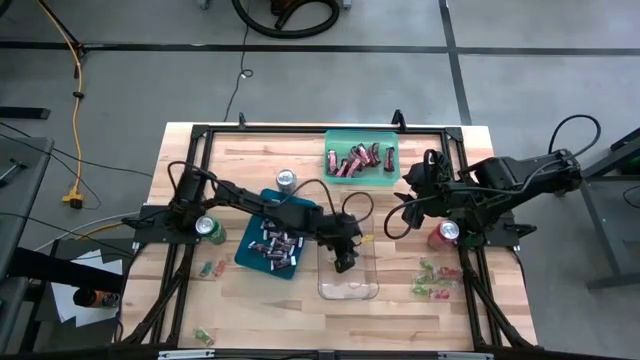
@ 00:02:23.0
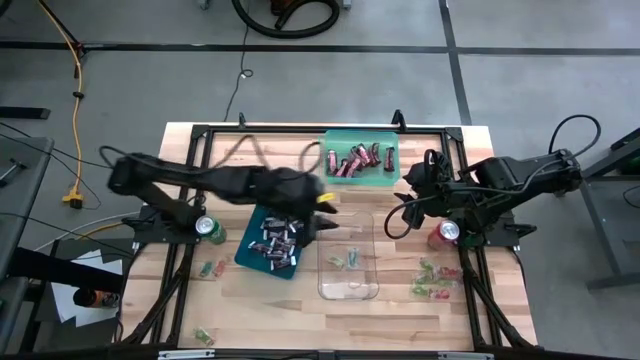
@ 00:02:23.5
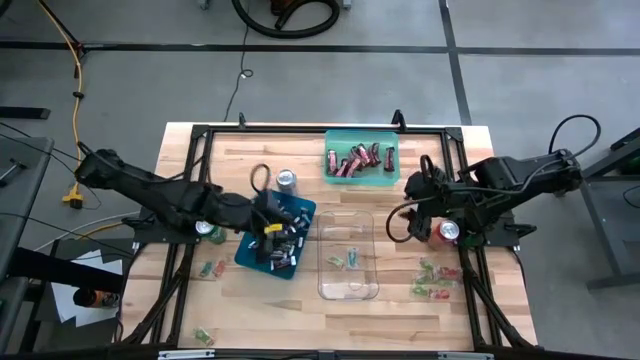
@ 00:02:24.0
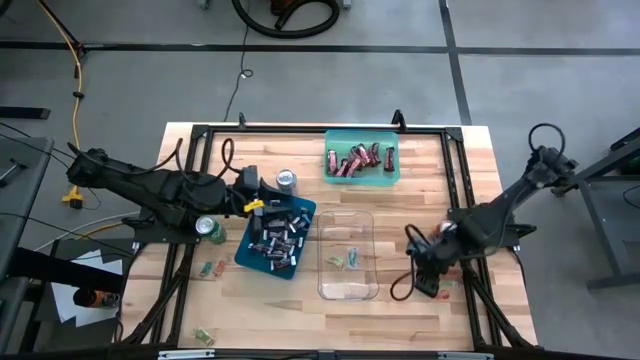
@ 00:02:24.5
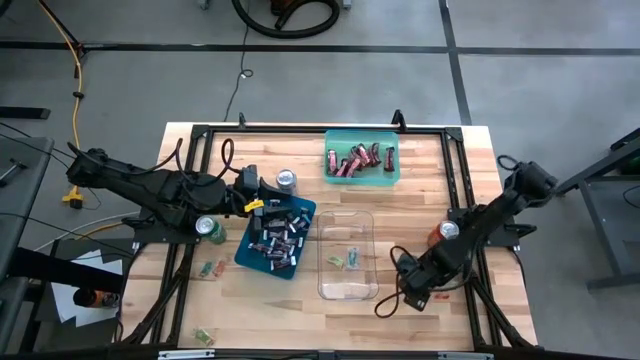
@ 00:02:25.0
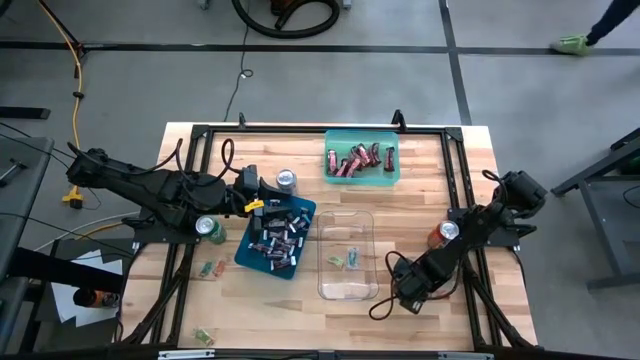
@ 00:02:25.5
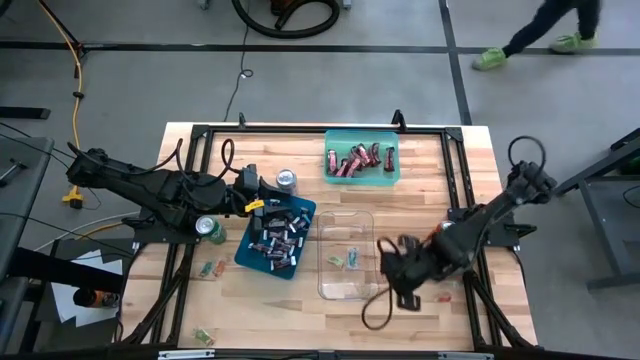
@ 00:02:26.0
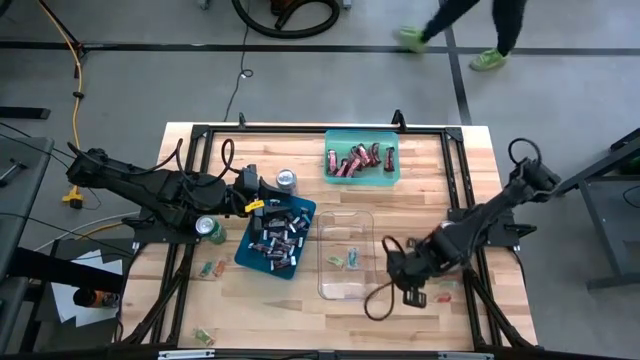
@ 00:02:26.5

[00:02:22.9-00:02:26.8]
Task: Sort candy
Put the green candy into the transparent bin

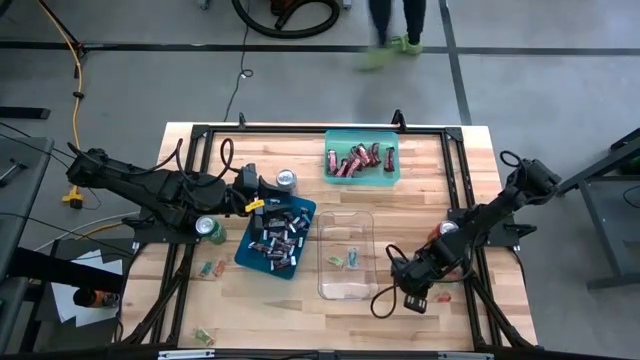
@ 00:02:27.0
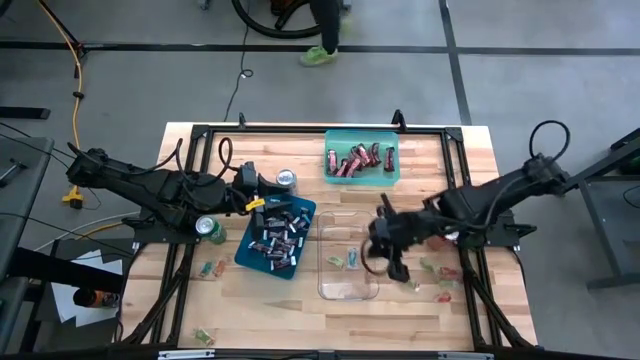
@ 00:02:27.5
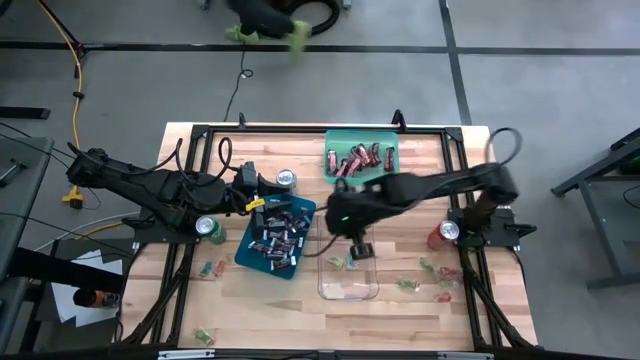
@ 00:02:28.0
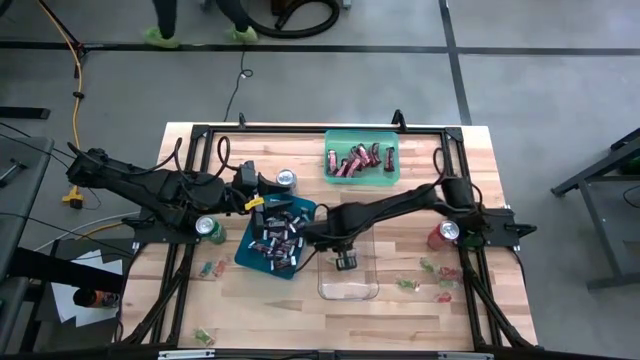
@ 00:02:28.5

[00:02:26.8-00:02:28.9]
Put the green candy into the transparent bin

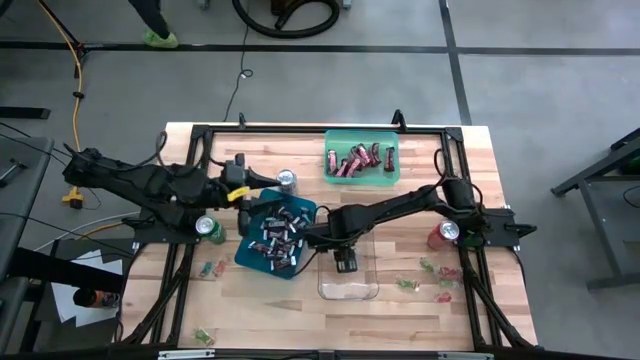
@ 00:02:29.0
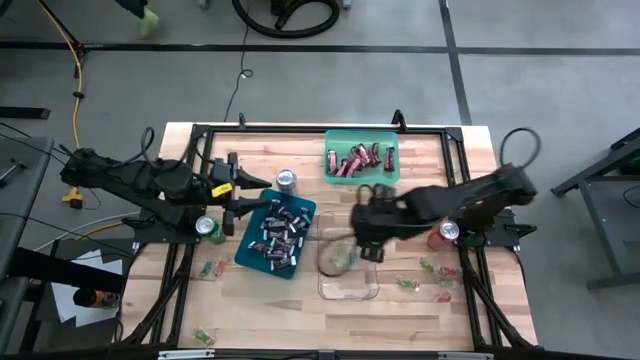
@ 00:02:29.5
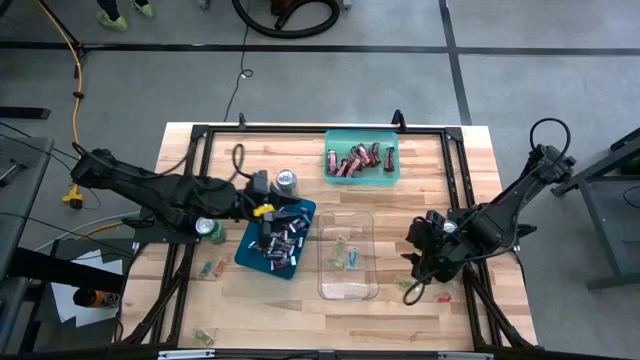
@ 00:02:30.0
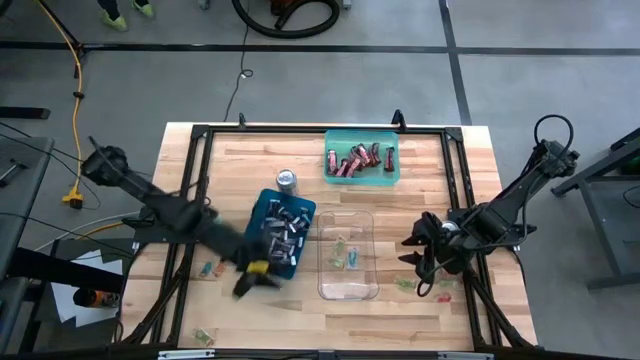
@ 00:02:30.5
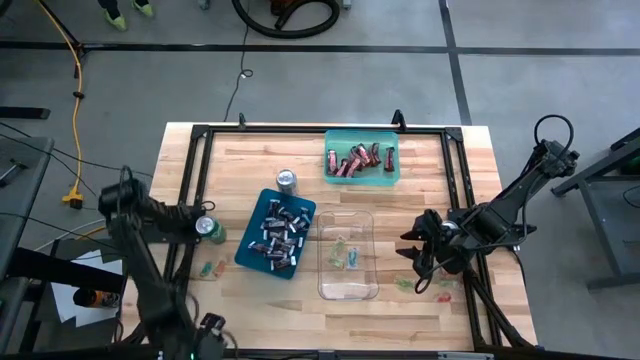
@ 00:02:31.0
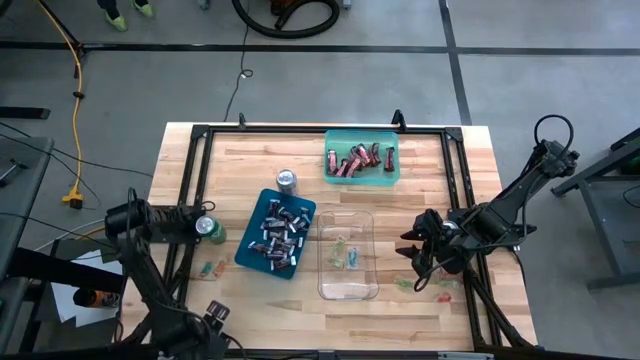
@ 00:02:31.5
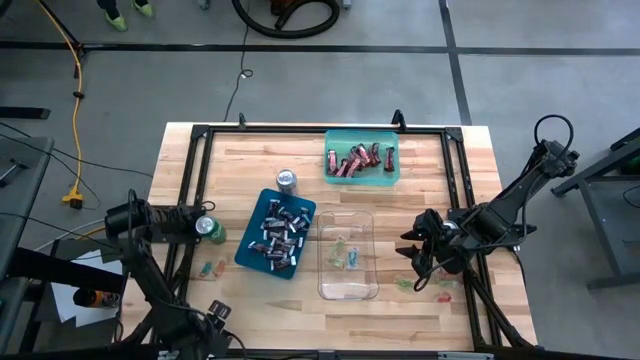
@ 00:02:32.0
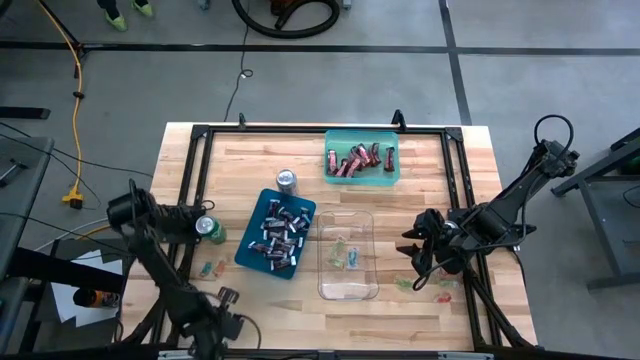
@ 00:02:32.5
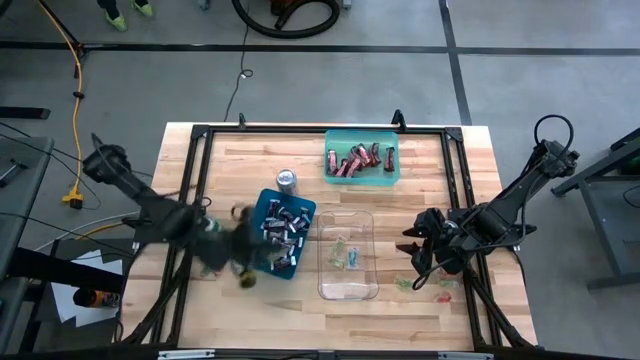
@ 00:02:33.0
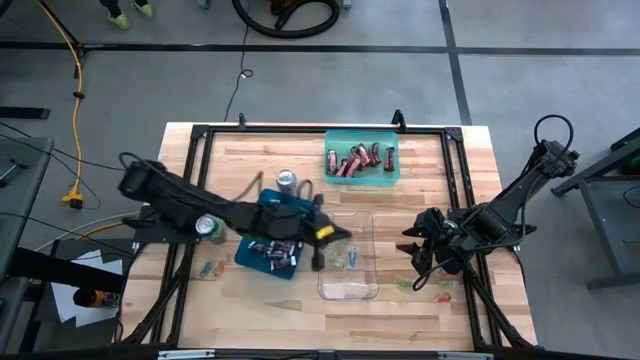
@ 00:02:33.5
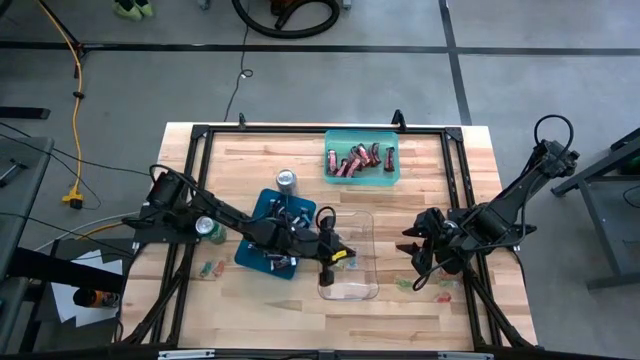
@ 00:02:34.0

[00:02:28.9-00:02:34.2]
Put the green candy into the transparent bin

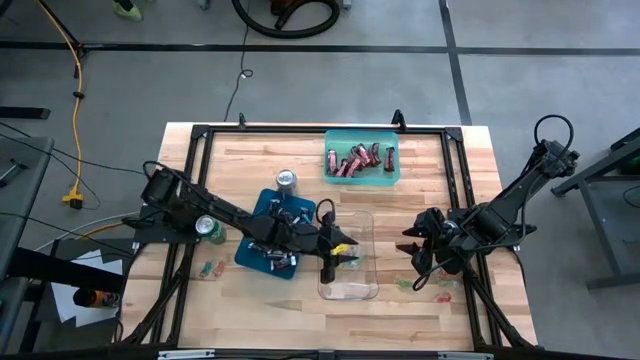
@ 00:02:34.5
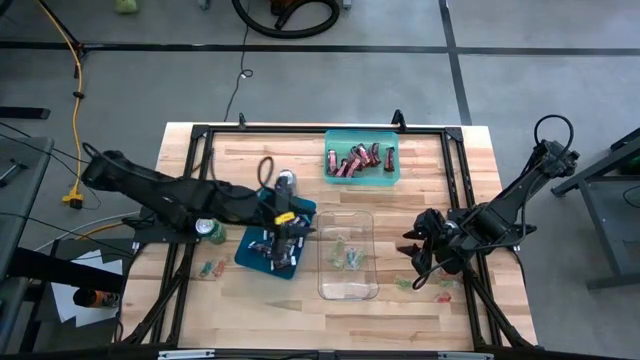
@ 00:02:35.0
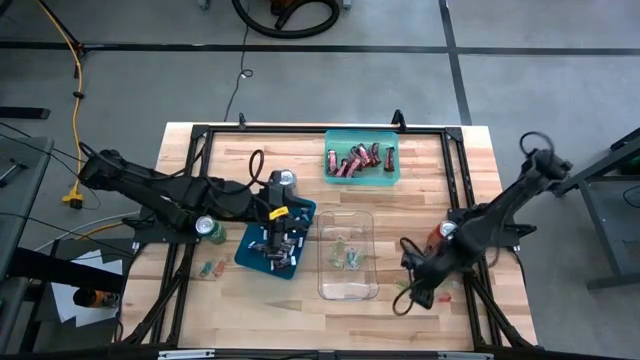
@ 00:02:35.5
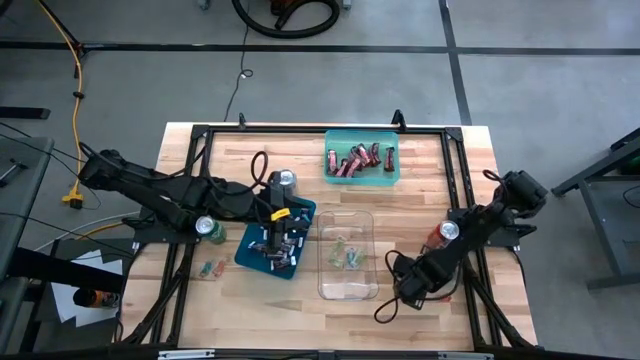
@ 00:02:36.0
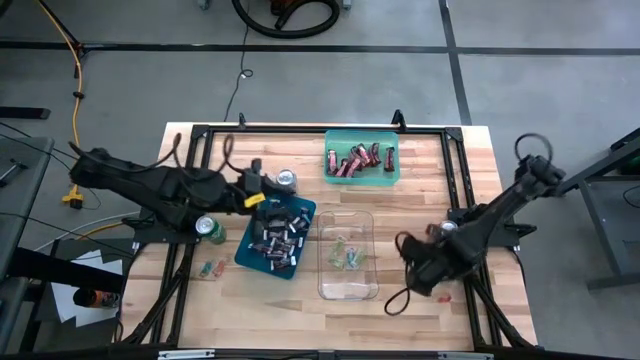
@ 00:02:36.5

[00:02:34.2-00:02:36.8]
Put the green candy into the transparent bin

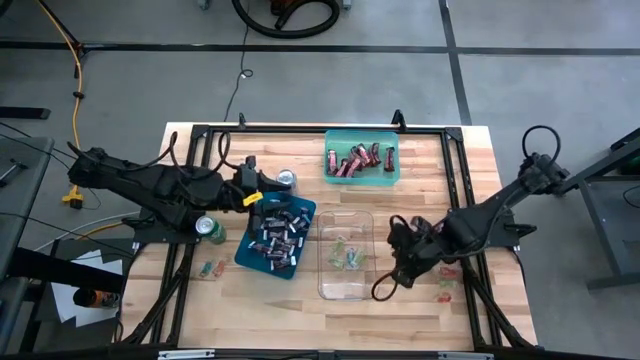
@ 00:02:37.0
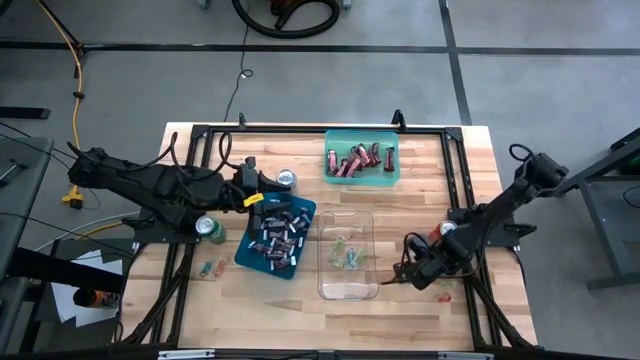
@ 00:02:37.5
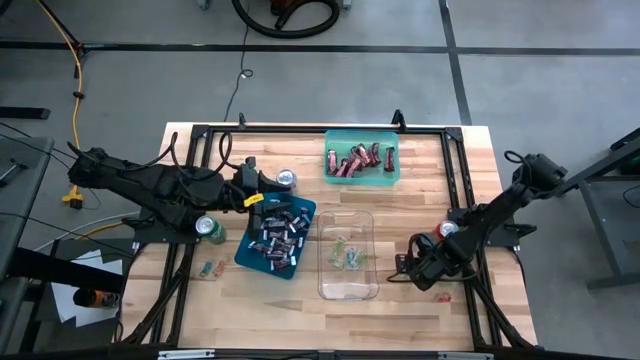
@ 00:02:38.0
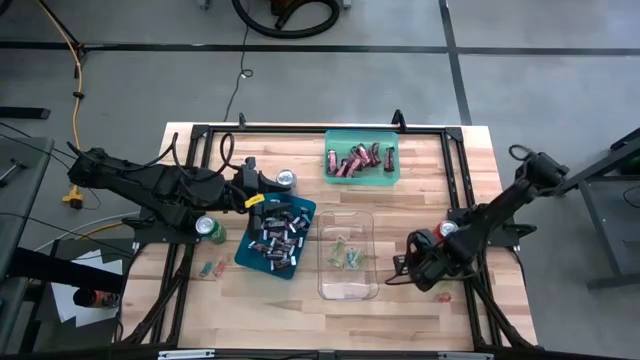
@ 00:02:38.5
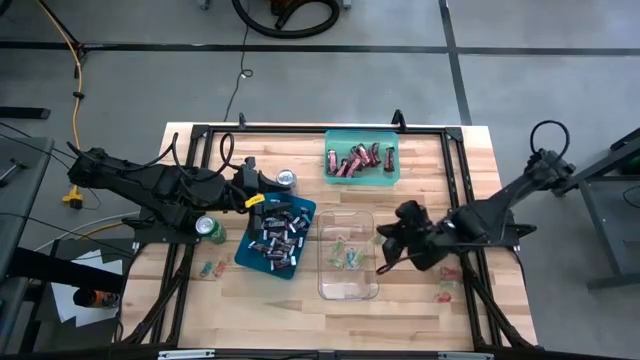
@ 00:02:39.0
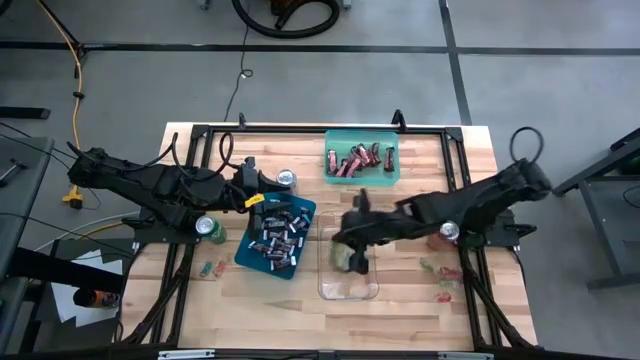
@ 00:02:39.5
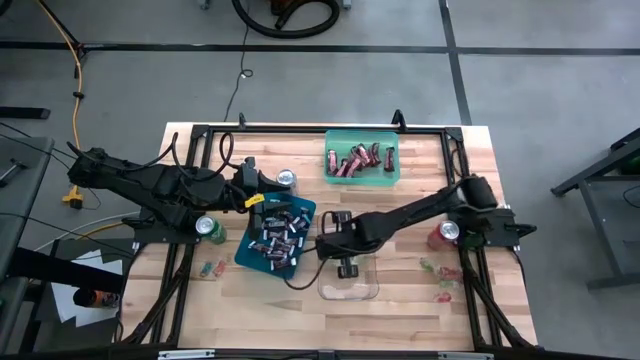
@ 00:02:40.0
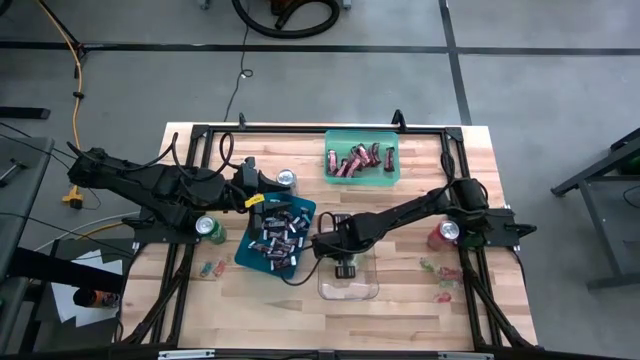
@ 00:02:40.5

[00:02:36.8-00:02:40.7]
Put the green candy into the transparent bin

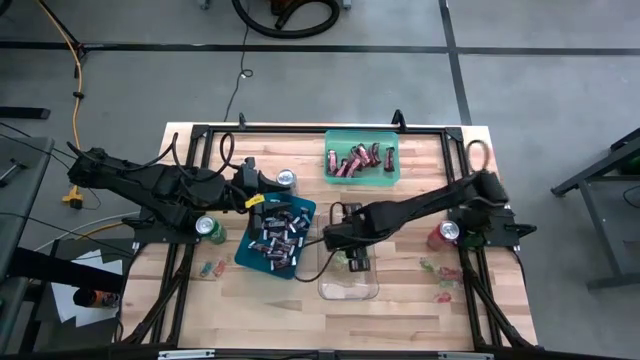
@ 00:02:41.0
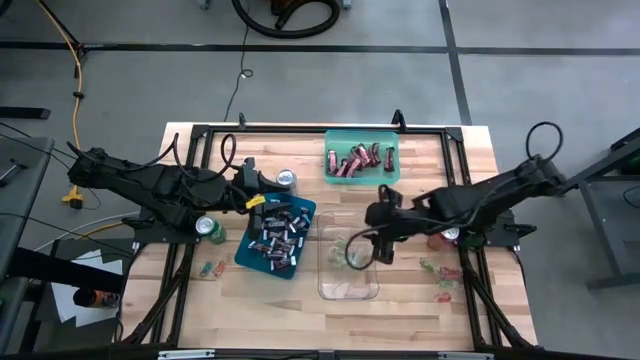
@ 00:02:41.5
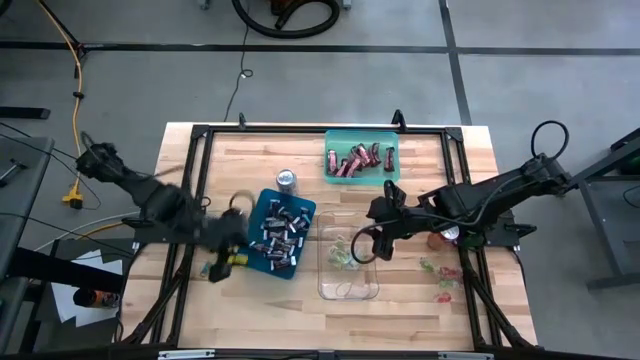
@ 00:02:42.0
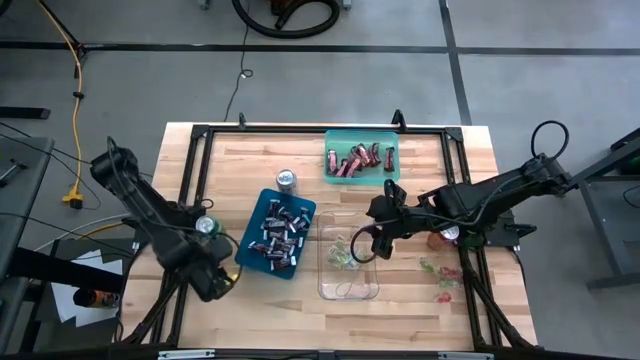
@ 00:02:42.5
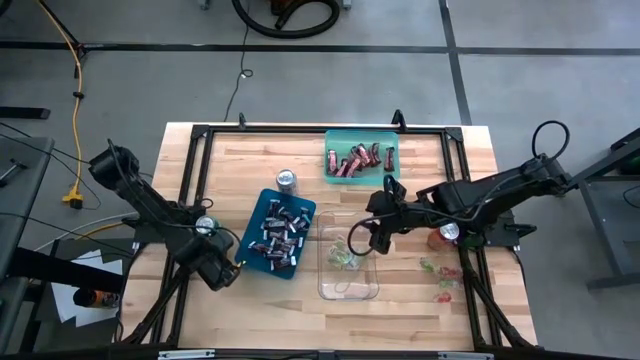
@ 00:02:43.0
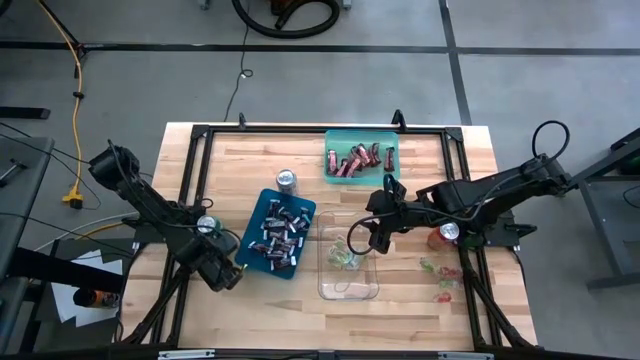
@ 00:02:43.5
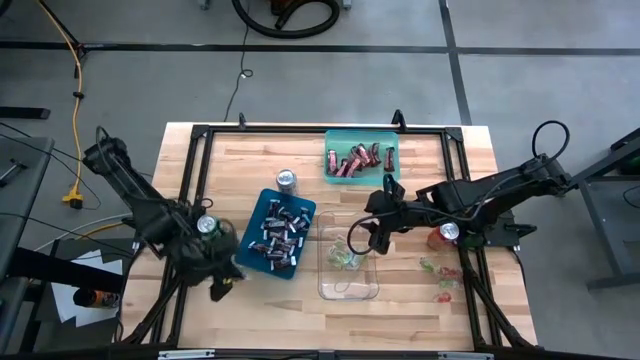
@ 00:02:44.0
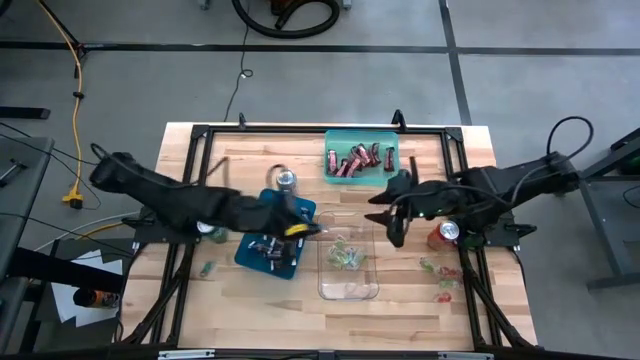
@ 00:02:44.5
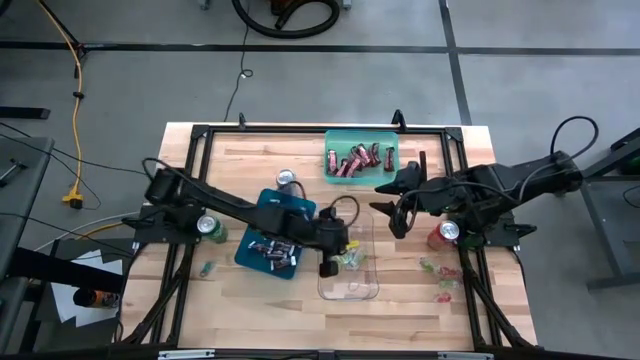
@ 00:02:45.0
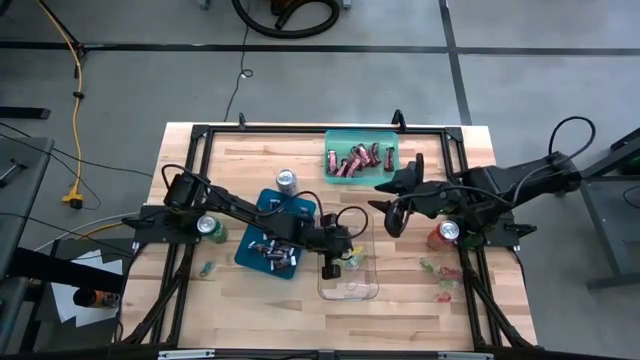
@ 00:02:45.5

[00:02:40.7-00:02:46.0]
Put the orange candy into the transparent bin
